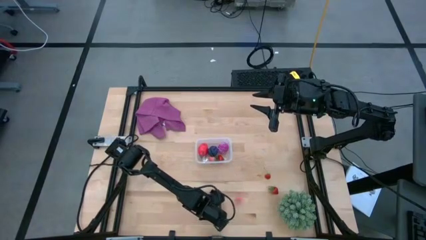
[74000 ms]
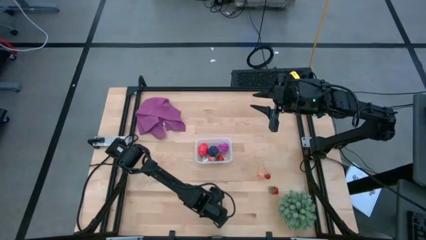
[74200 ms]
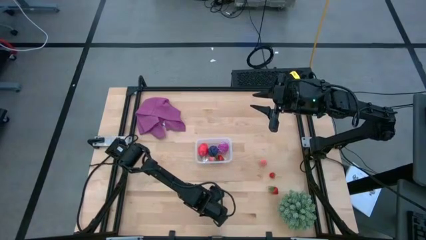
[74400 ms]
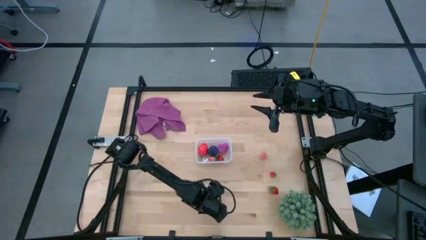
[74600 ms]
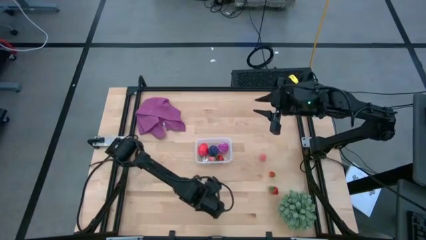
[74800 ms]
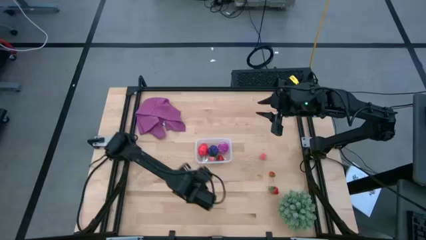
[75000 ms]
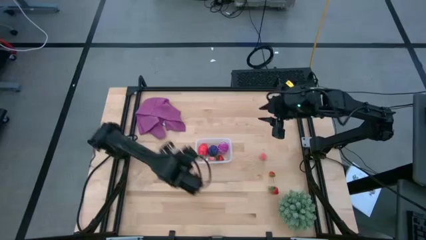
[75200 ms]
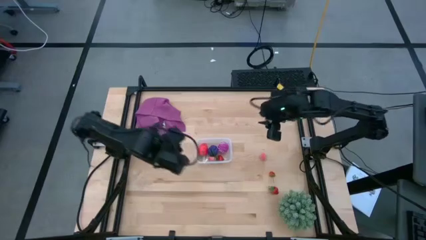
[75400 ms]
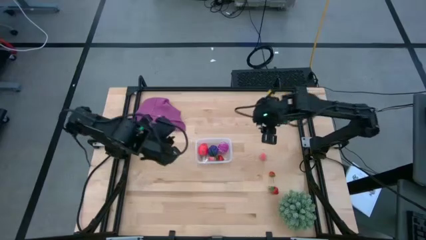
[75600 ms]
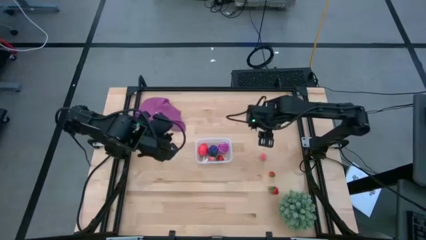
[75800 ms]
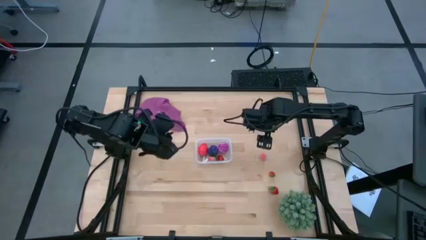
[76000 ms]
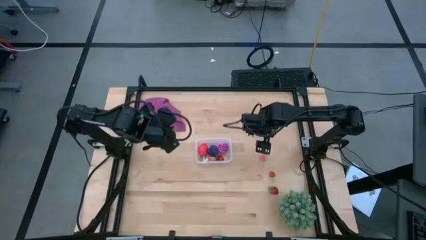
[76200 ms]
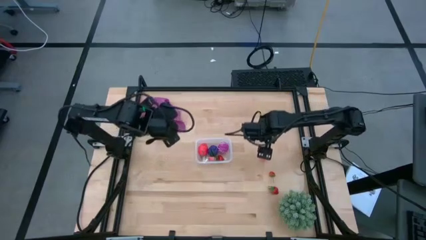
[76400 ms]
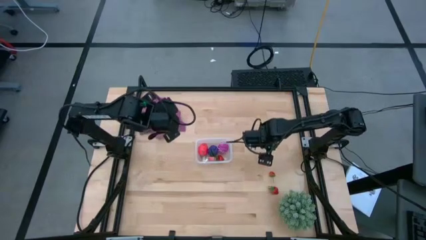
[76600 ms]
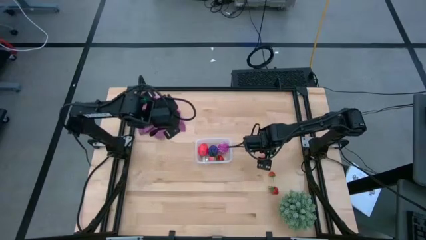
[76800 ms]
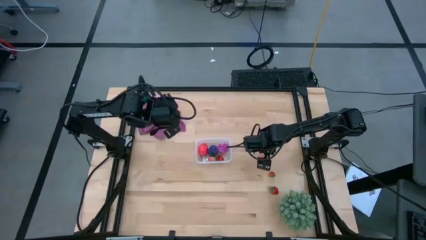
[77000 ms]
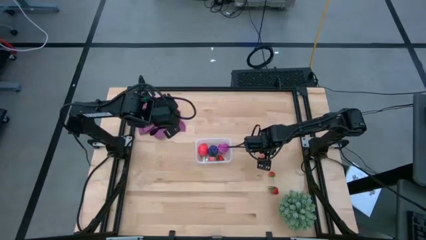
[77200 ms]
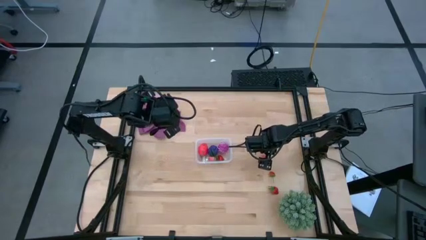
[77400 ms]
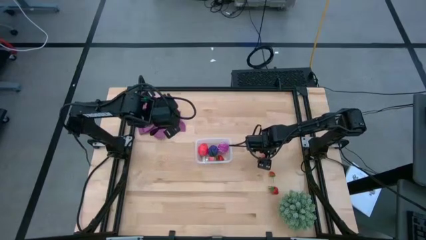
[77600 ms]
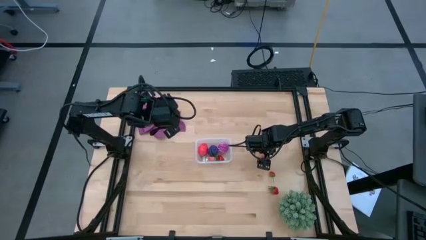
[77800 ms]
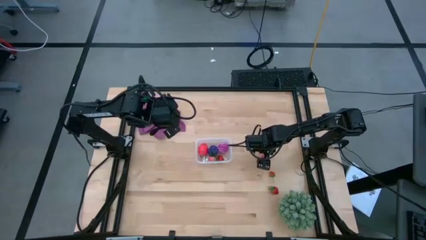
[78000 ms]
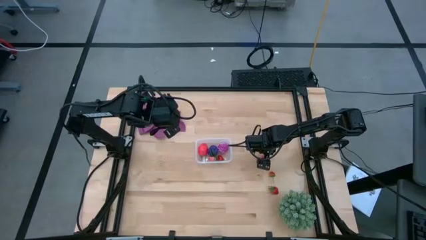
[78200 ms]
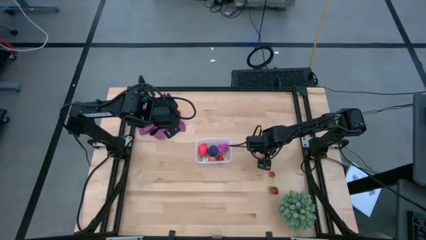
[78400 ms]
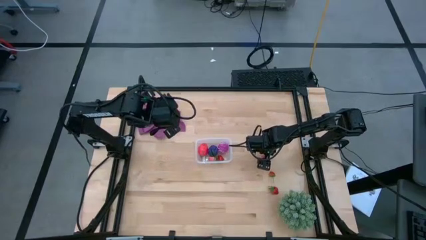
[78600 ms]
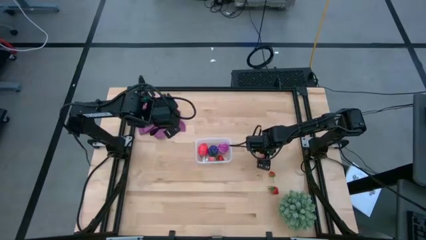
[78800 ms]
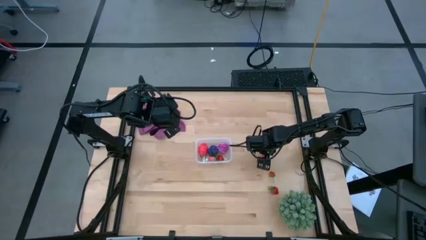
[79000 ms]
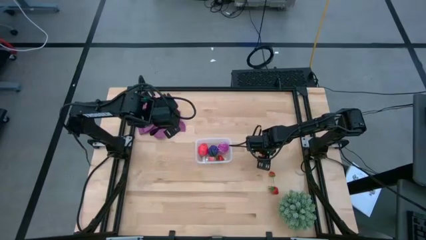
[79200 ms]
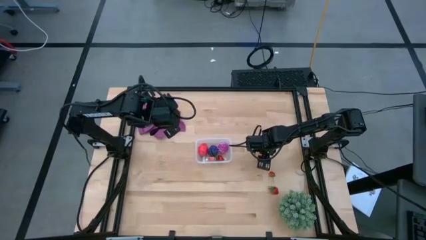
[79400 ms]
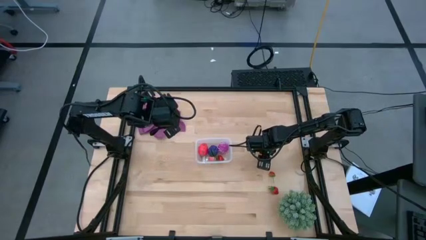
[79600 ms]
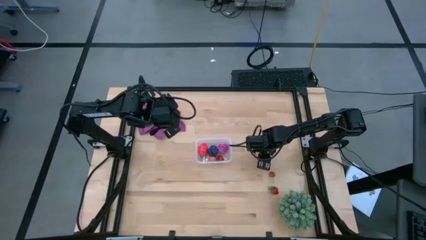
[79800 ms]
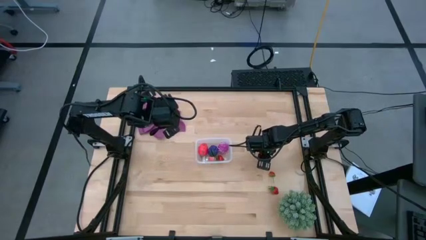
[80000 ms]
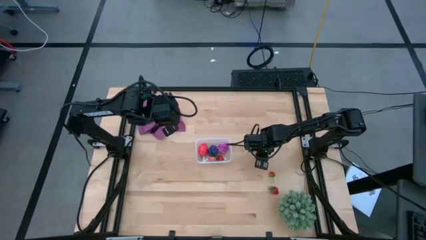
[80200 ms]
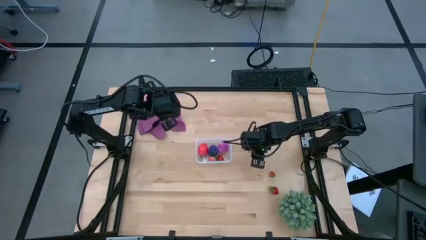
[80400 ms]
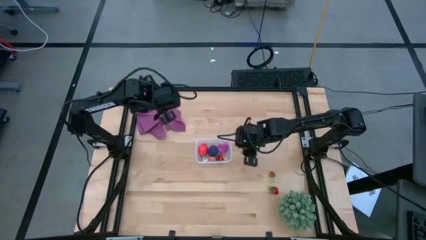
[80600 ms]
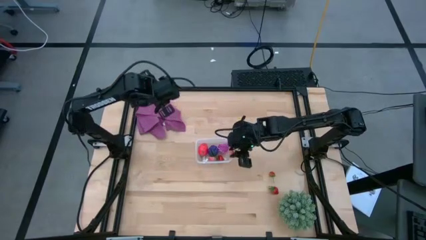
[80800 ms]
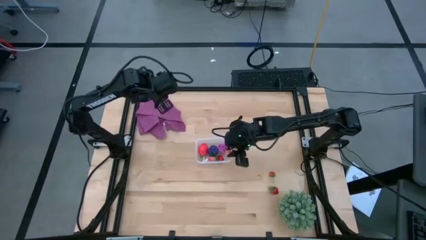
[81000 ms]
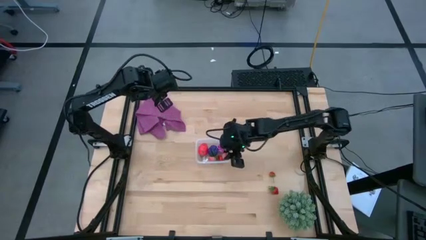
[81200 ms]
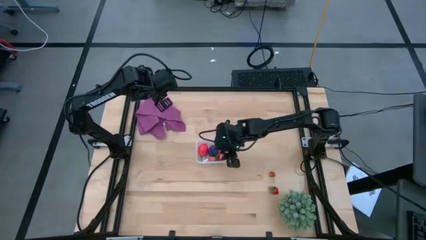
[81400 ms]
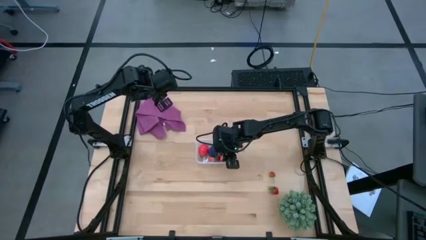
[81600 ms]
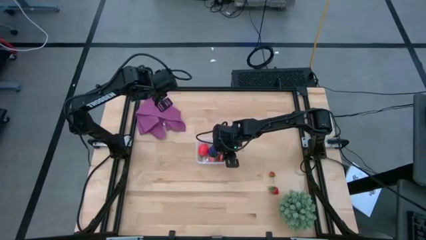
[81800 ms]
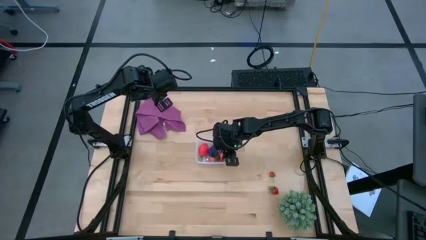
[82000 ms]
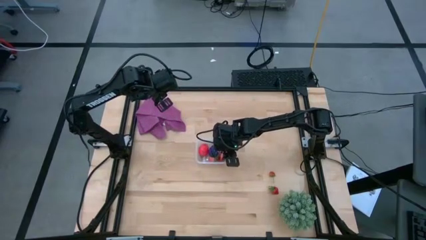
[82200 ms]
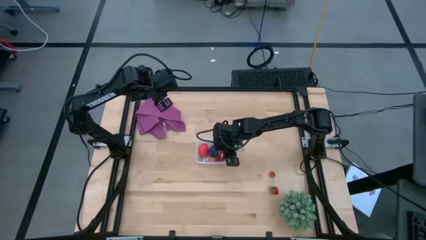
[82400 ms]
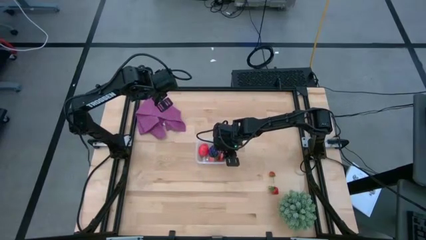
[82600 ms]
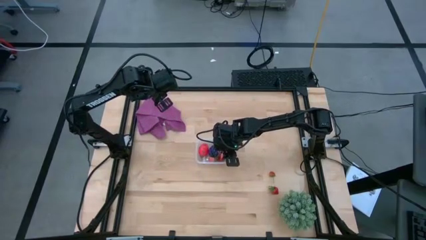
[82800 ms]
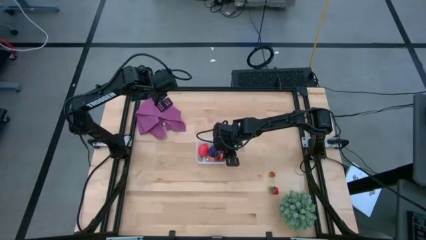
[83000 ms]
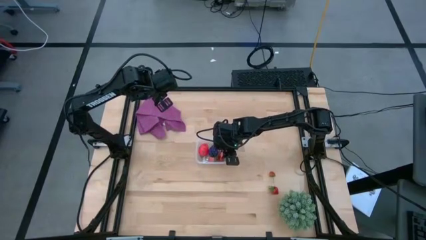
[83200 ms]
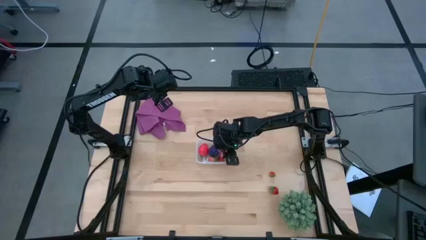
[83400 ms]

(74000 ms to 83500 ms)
Task: Pick and placing Produce into tupperware
Put the pink peach into the transparent bin

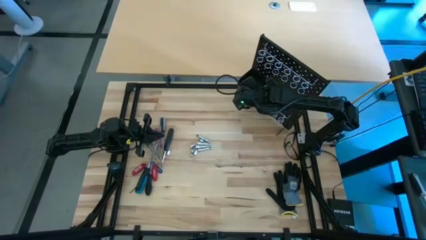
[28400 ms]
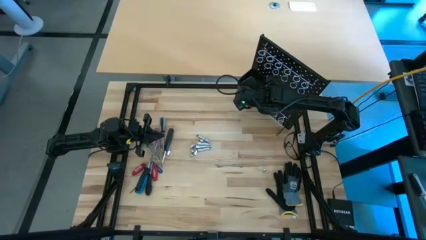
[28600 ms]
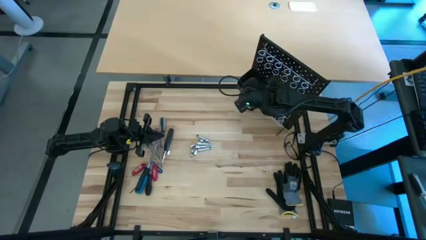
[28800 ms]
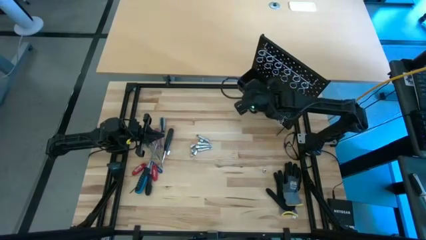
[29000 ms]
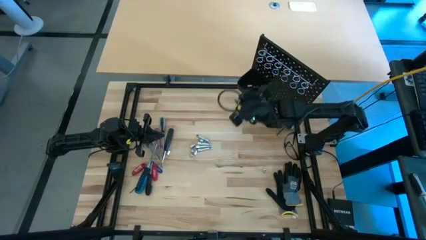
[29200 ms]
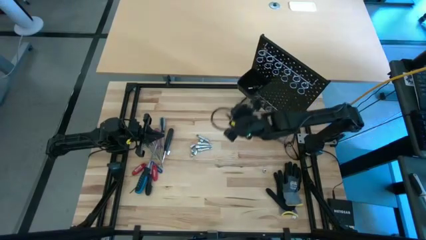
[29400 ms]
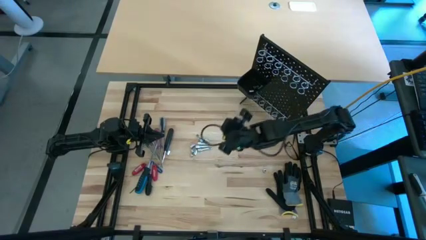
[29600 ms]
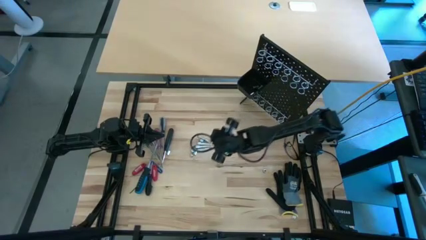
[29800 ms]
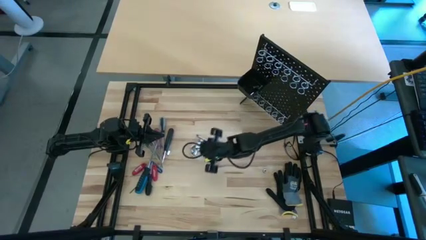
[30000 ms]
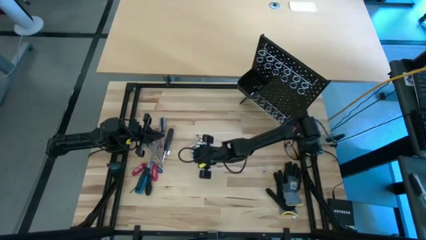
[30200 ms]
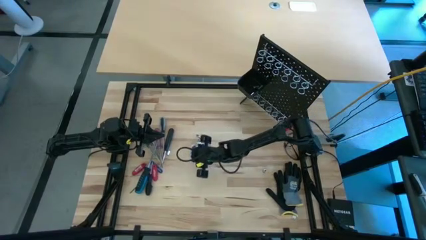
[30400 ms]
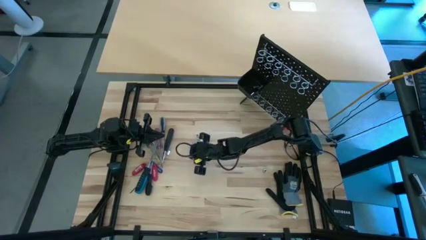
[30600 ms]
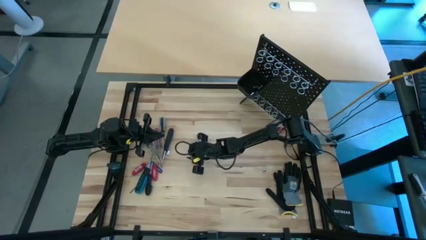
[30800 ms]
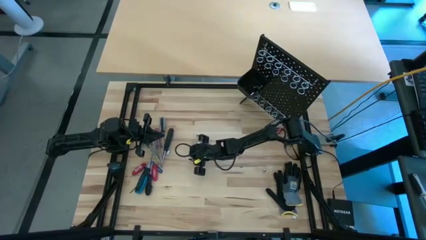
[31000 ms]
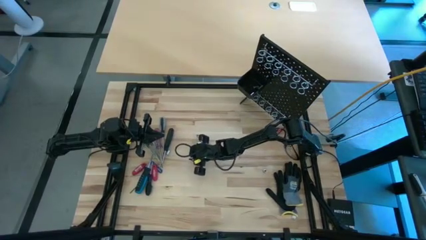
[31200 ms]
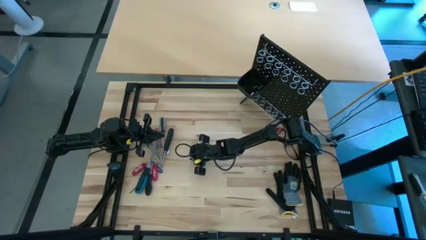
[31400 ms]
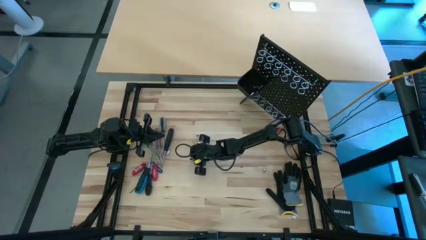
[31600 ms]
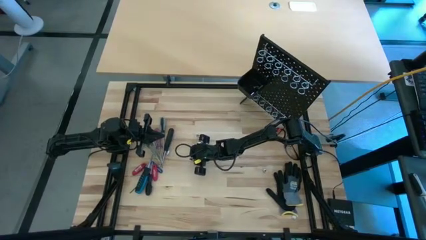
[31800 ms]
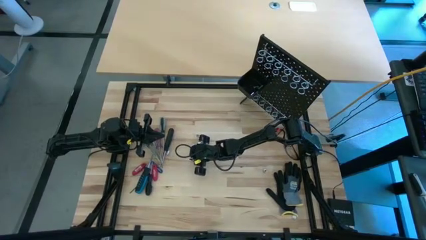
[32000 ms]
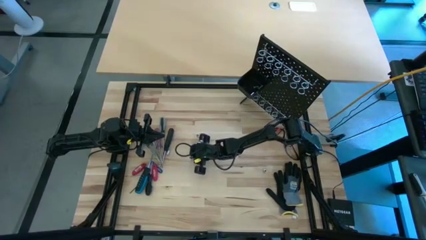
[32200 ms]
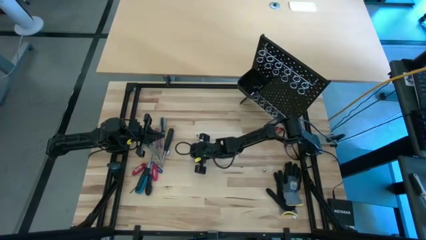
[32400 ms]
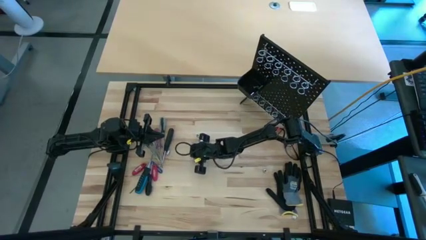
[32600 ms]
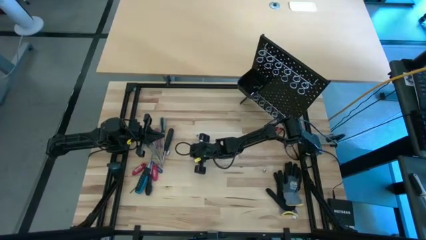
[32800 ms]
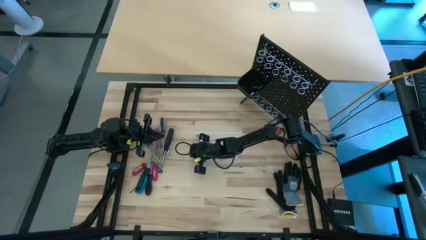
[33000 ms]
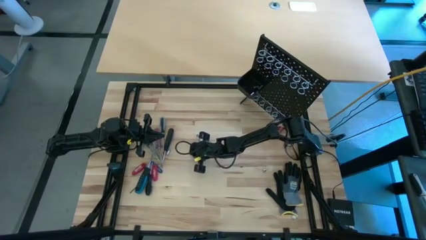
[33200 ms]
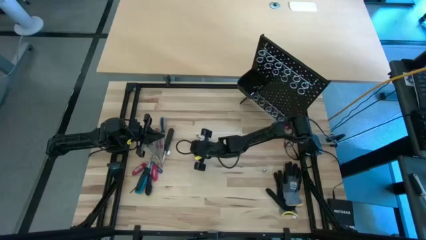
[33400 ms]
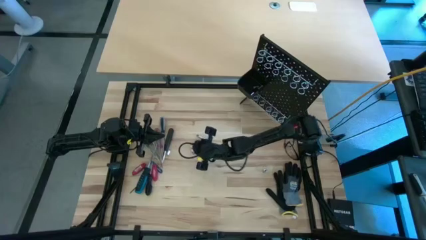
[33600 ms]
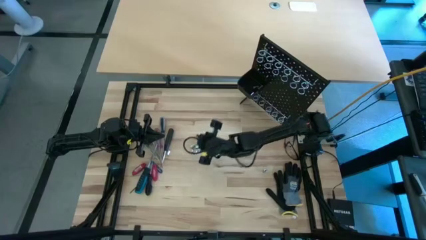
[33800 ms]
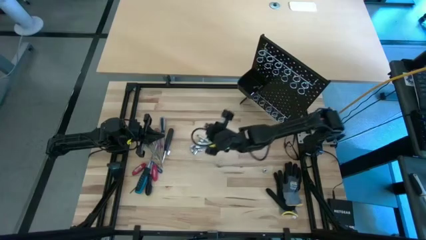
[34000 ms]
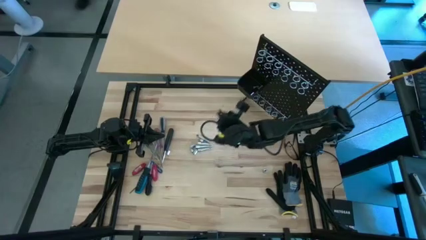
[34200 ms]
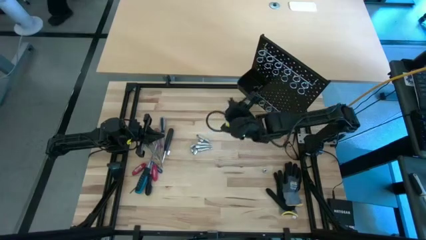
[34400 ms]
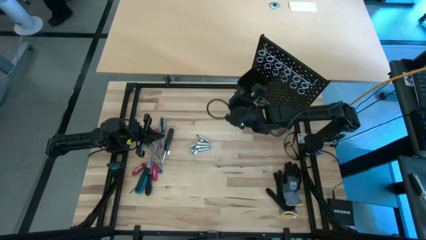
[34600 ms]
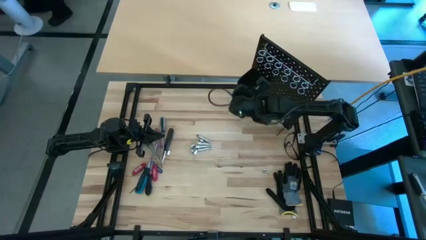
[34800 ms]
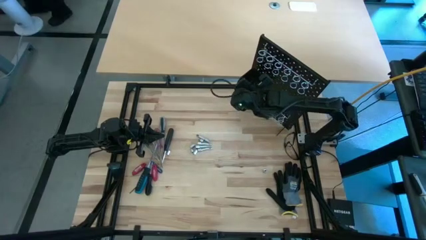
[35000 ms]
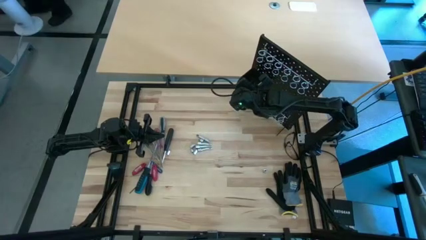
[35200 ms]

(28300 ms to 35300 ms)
Task: Hang tools onto peg board
Put the socket into the black pegboard bin
